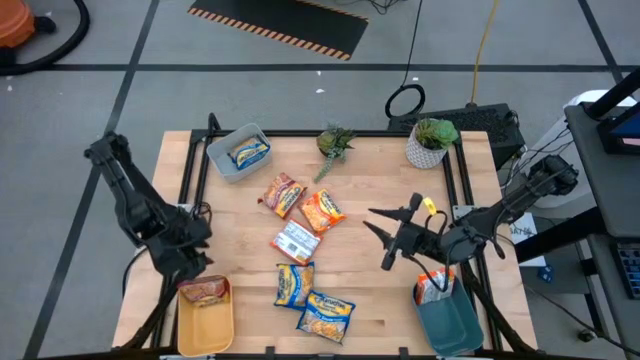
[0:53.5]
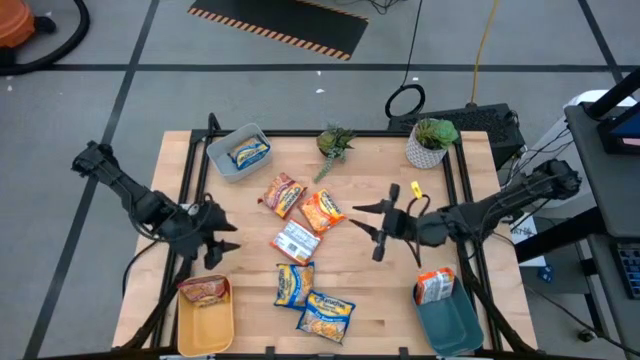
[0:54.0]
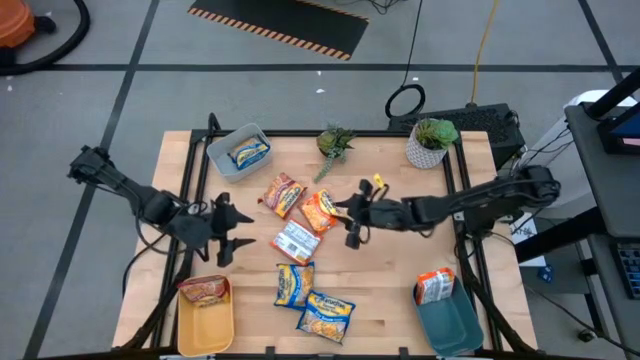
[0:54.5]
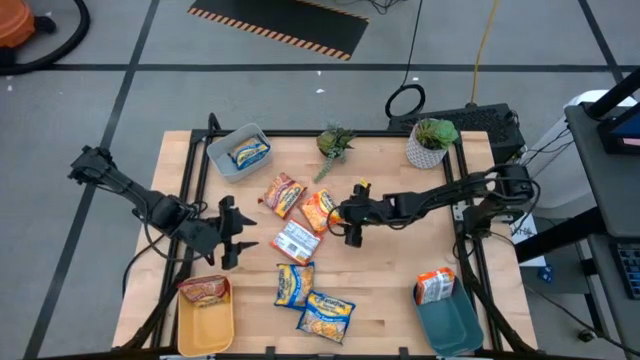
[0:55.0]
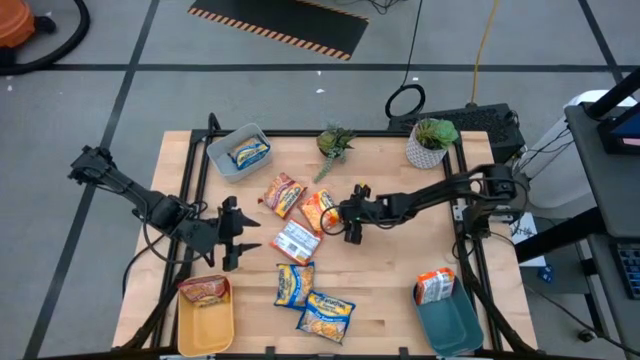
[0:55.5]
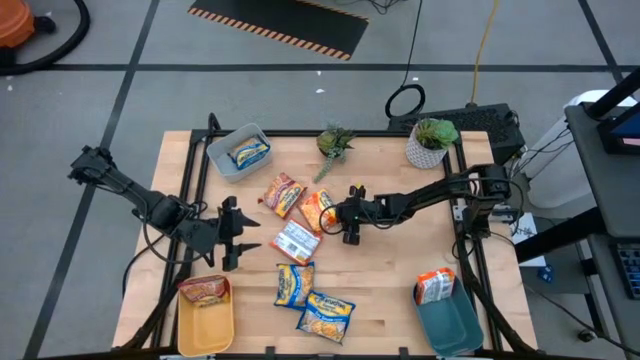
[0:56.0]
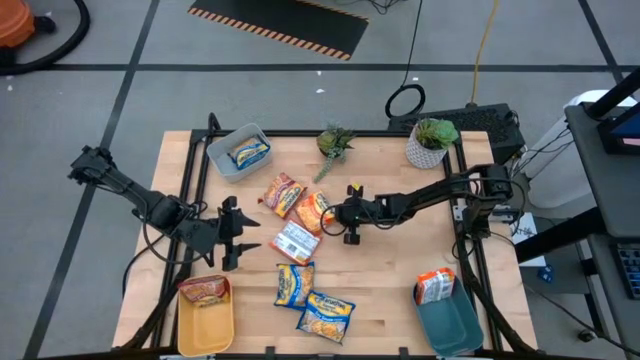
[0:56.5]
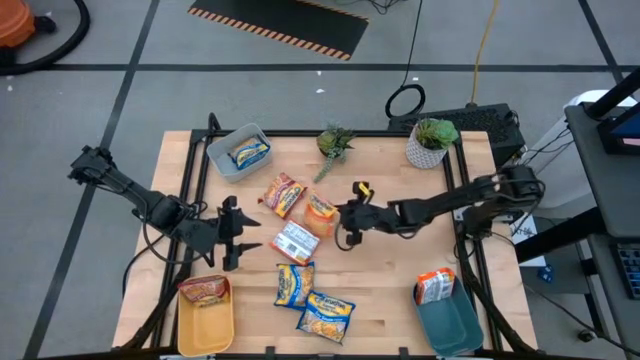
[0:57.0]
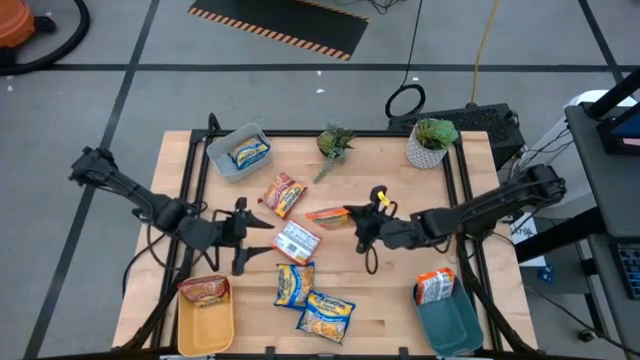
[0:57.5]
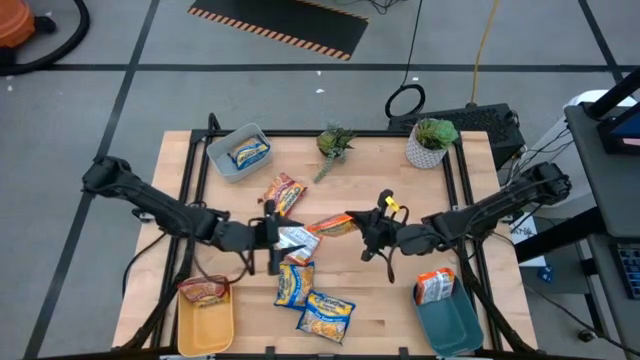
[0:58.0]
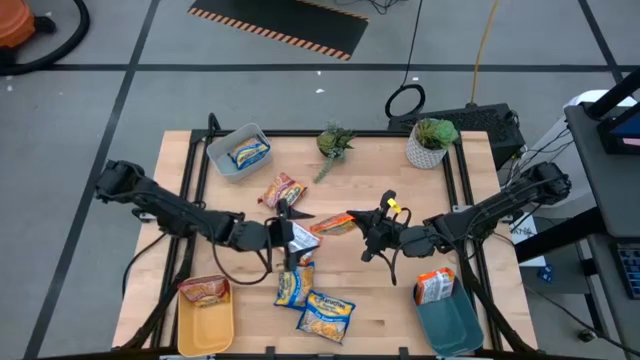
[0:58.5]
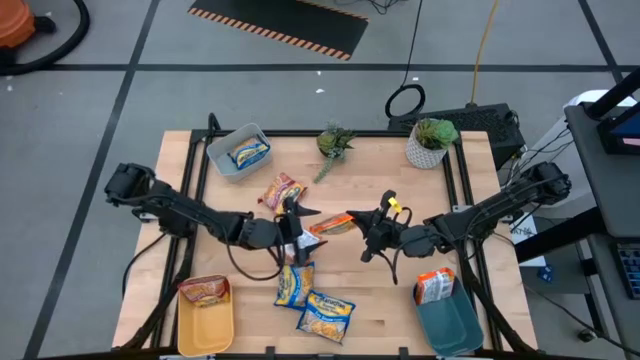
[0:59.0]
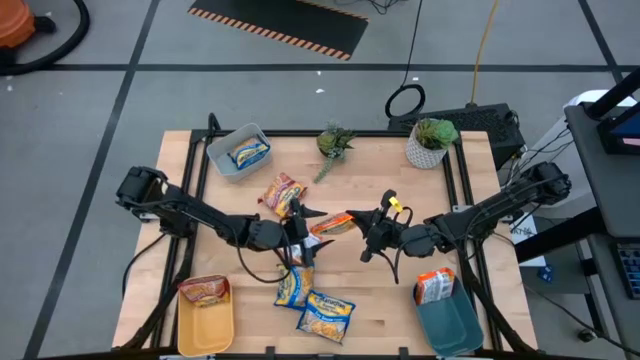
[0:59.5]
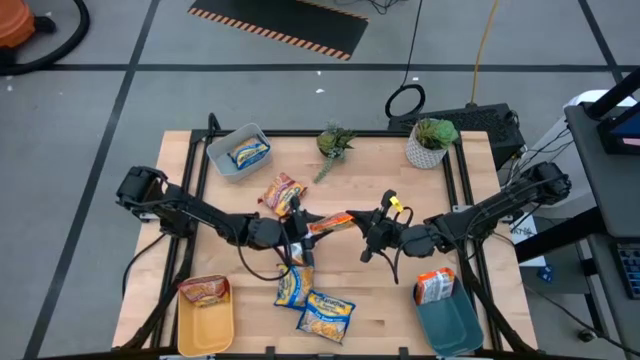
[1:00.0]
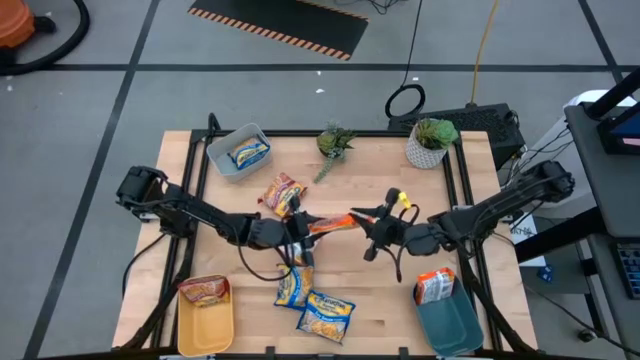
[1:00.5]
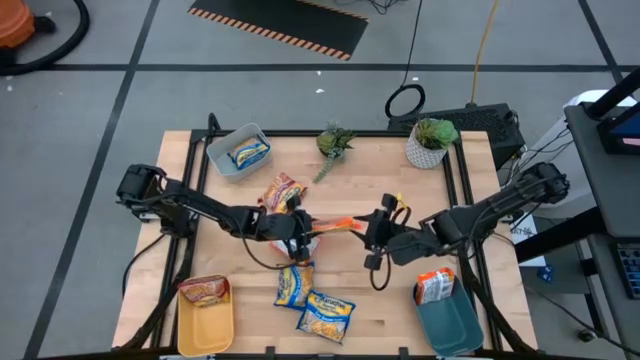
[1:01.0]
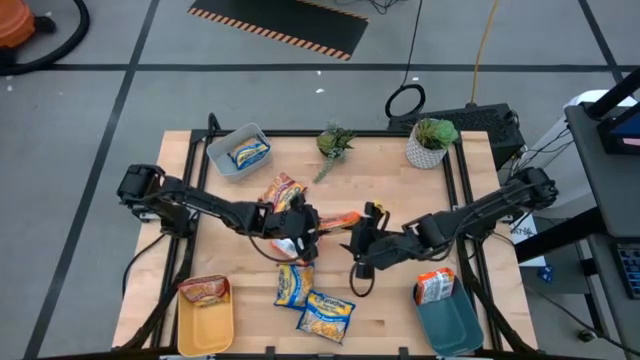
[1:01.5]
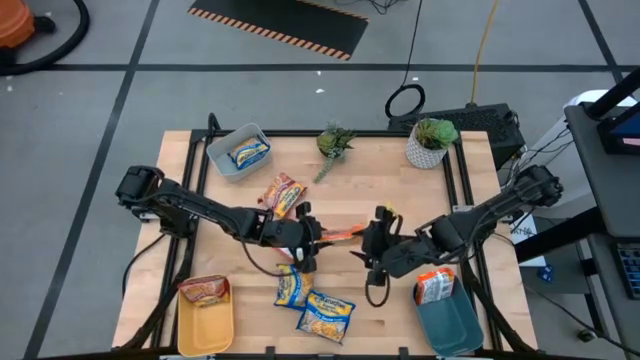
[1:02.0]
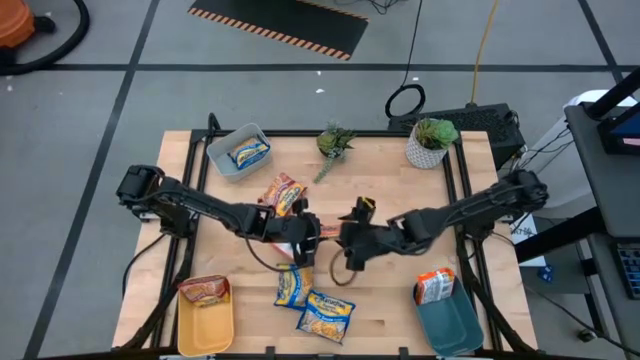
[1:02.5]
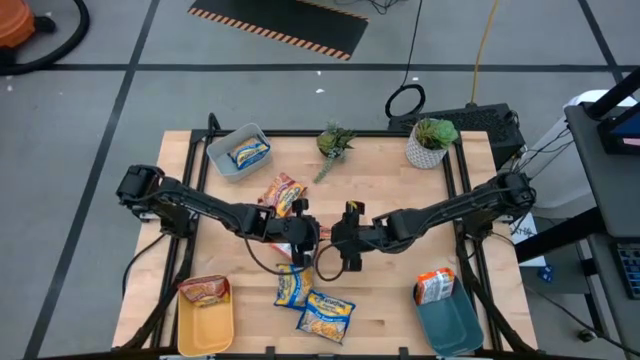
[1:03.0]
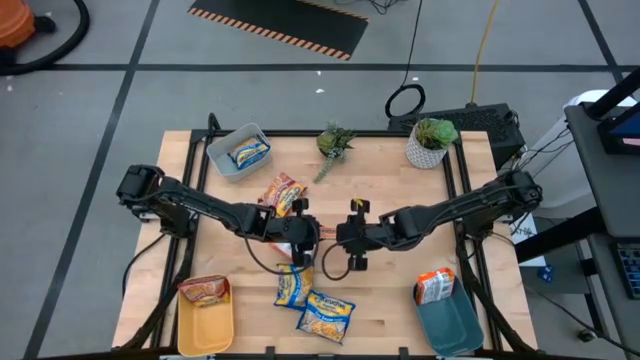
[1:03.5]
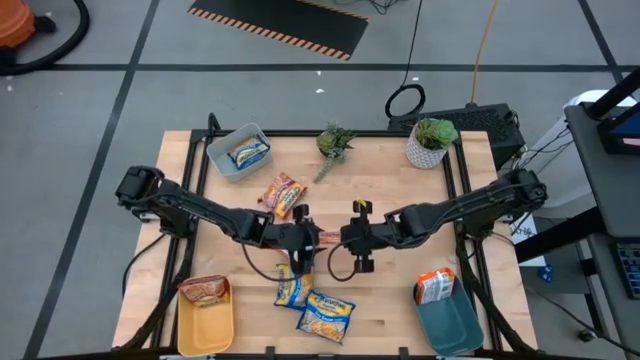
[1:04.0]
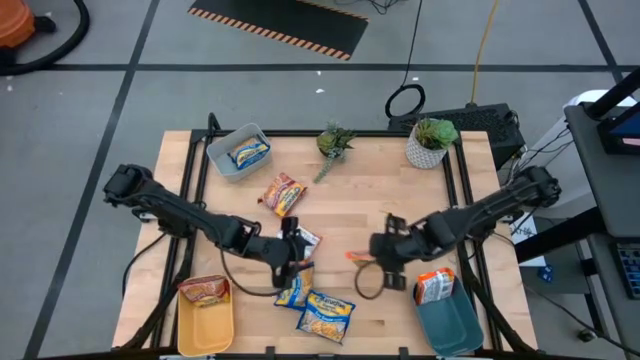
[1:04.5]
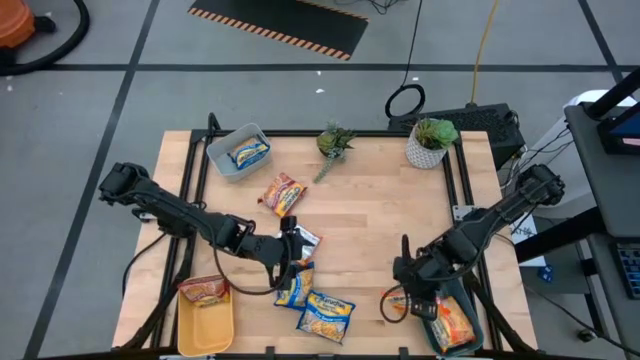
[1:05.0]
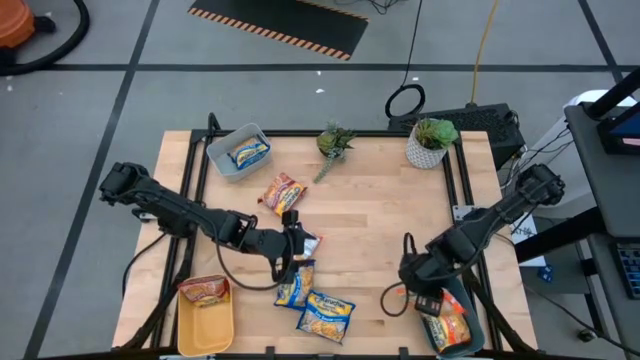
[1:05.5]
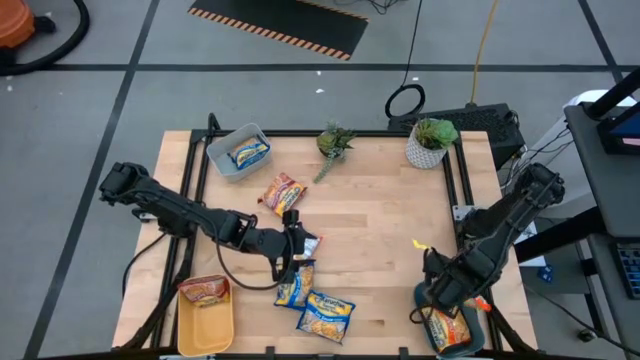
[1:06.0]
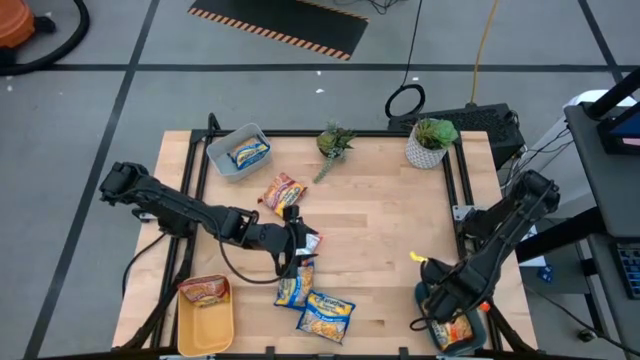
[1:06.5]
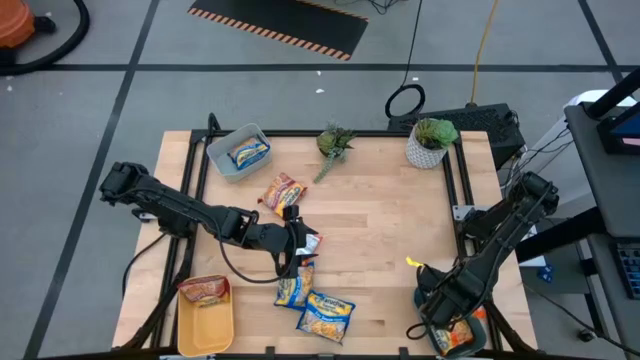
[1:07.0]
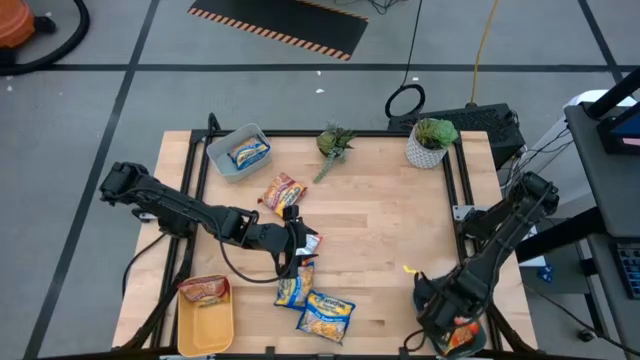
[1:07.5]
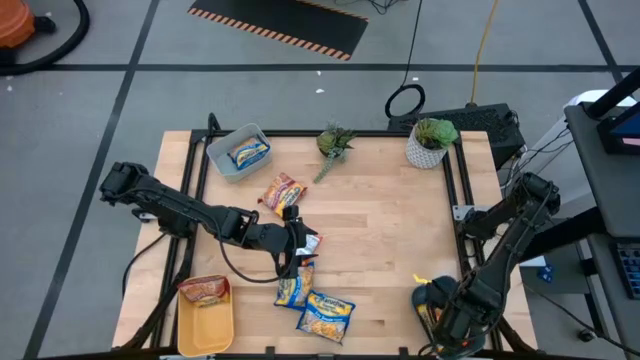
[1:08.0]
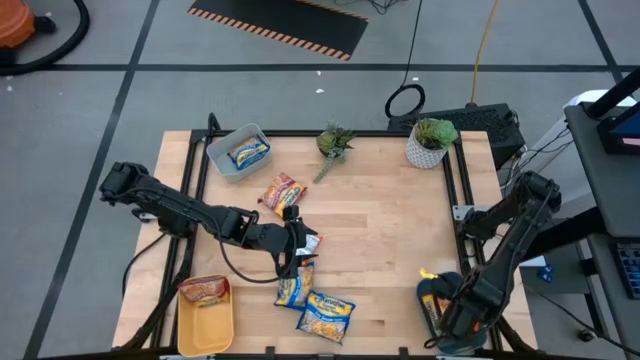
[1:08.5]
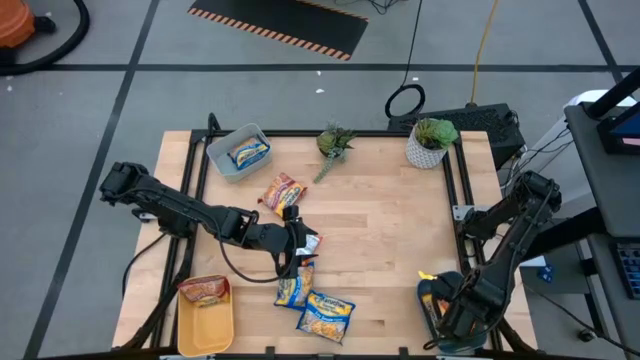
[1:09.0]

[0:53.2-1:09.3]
Task: Sort Maruchan noodles
Put the right orange noodle pack into the blue bin

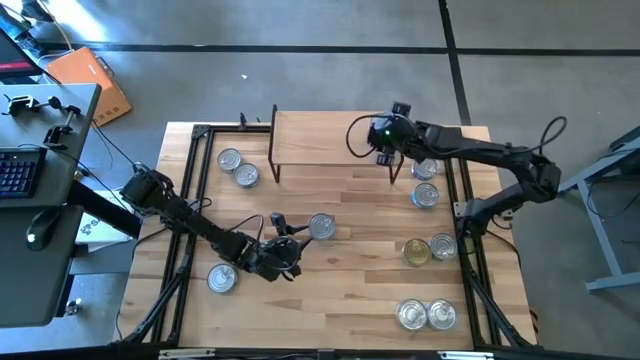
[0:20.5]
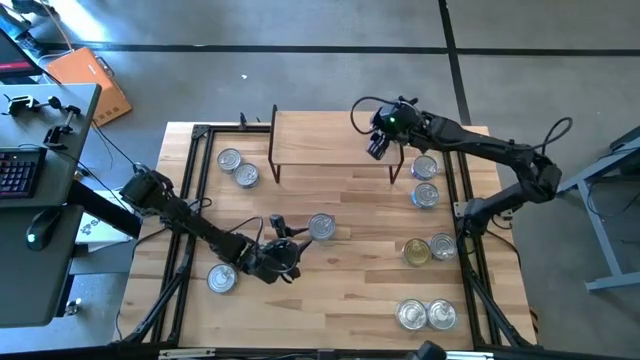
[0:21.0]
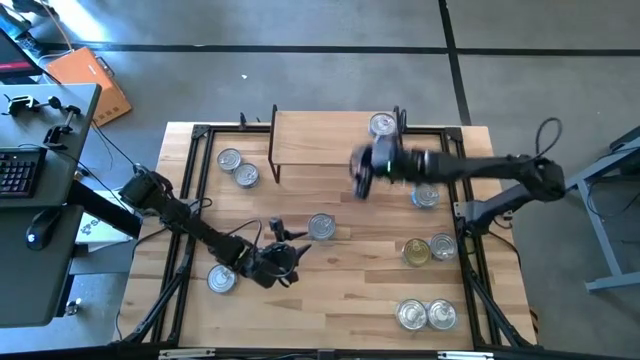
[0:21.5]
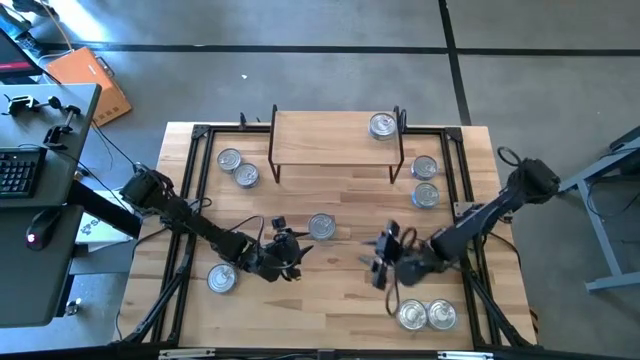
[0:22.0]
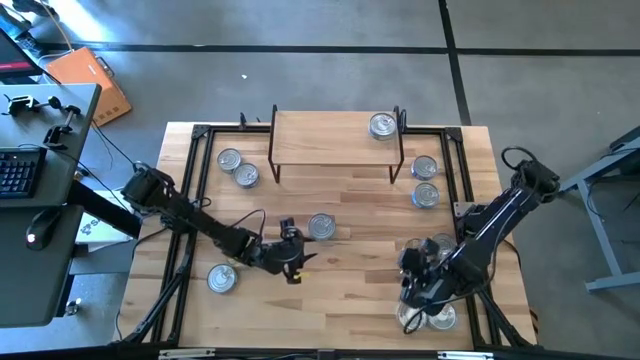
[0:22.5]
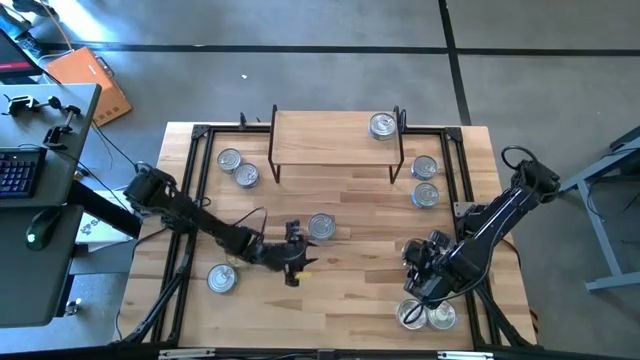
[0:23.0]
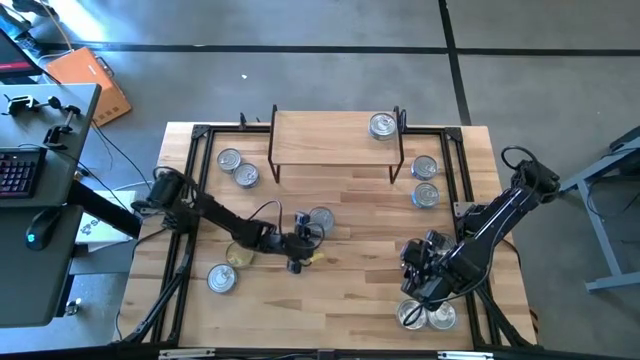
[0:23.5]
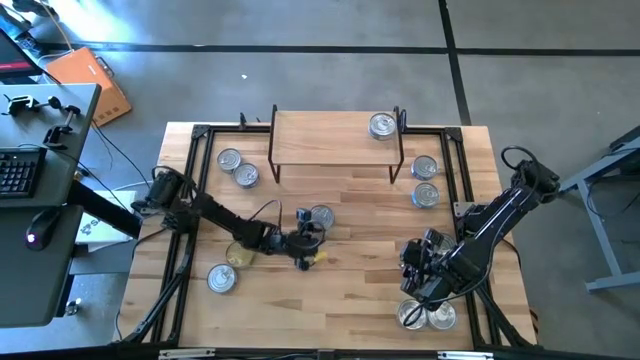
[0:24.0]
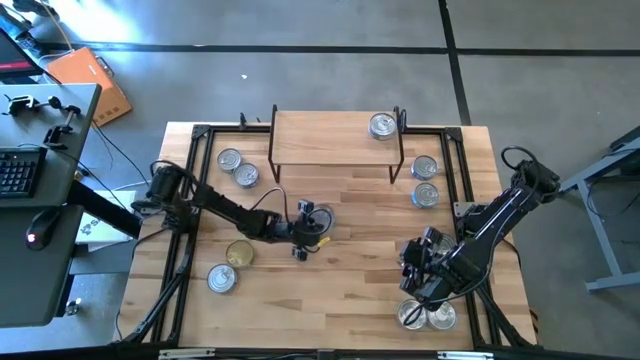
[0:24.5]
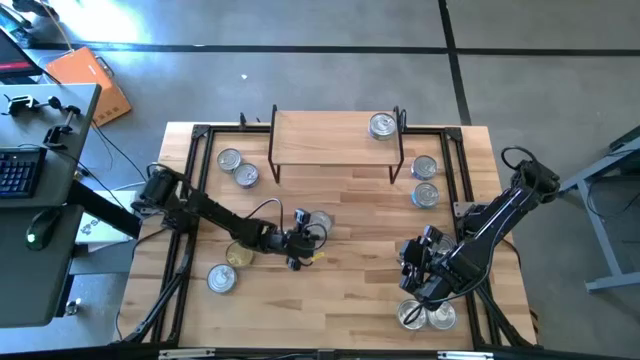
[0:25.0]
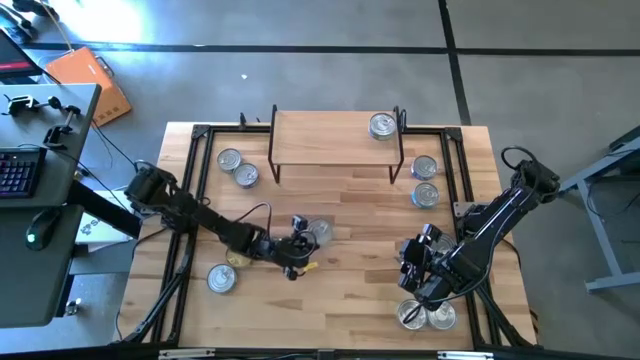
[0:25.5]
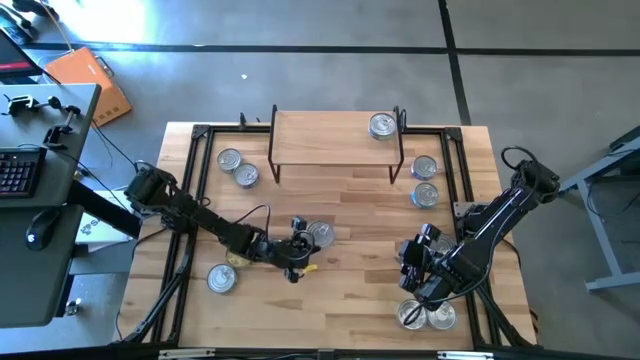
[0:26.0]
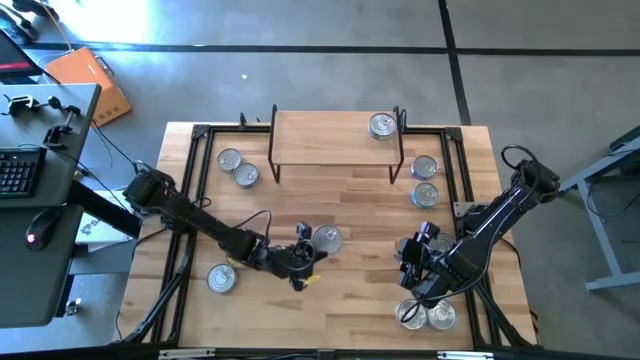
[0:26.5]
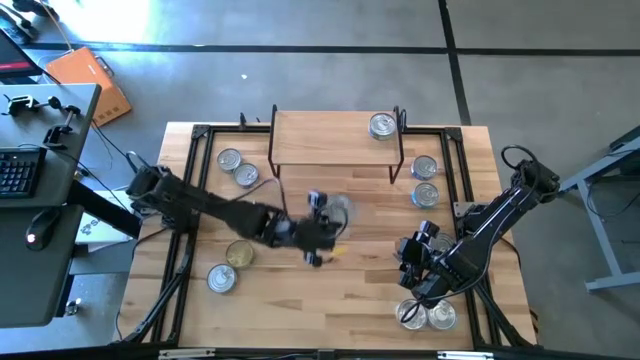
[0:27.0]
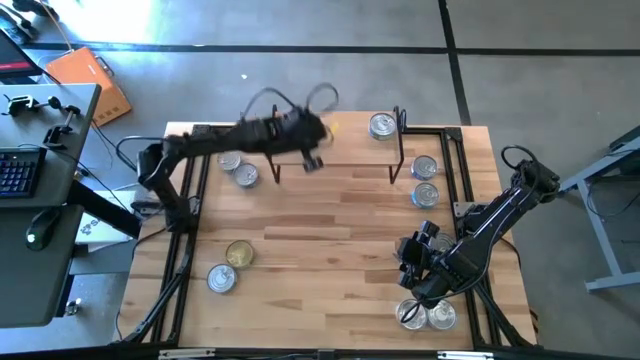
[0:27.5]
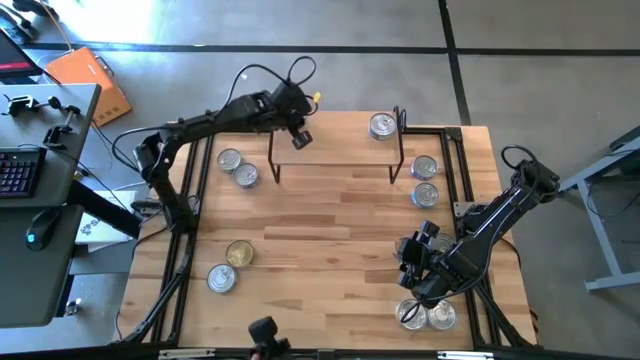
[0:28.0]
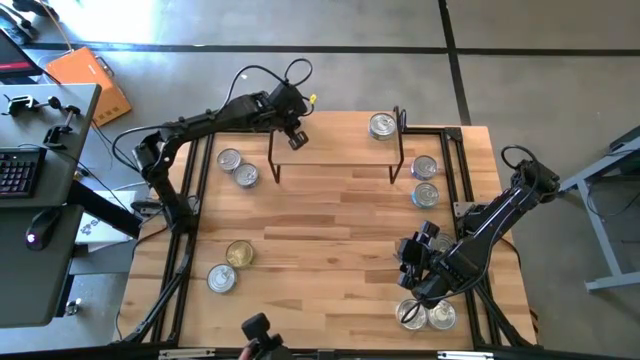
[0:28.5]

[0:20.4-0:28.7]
Task: Stack canned seafood by type on shelf
Put the yellow blue tuna can on the shelf
